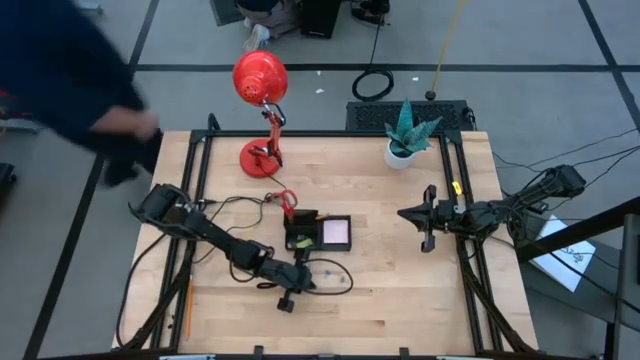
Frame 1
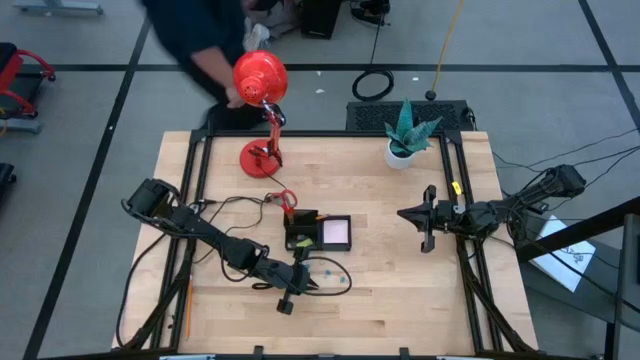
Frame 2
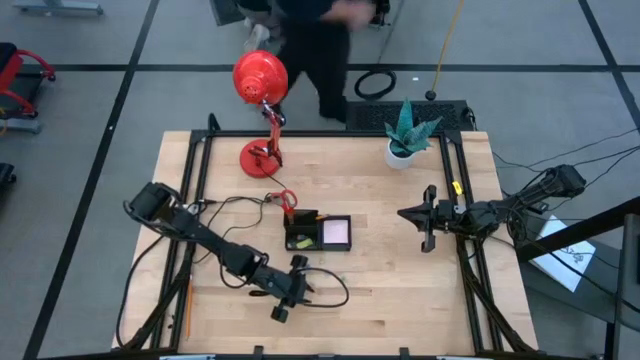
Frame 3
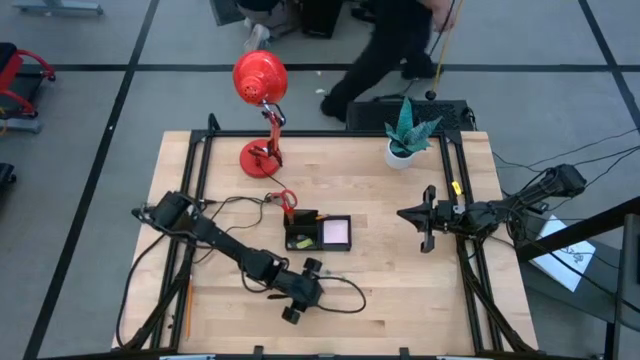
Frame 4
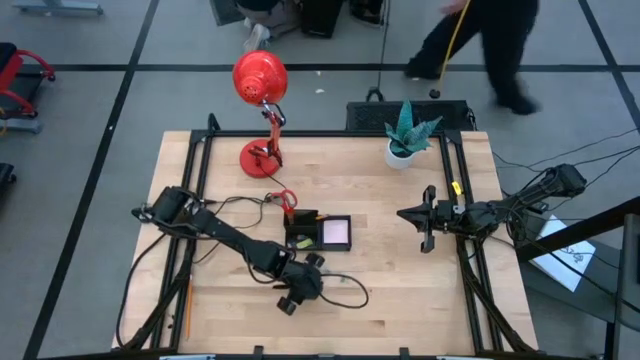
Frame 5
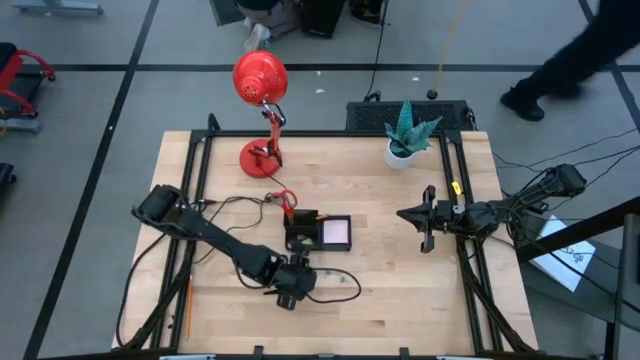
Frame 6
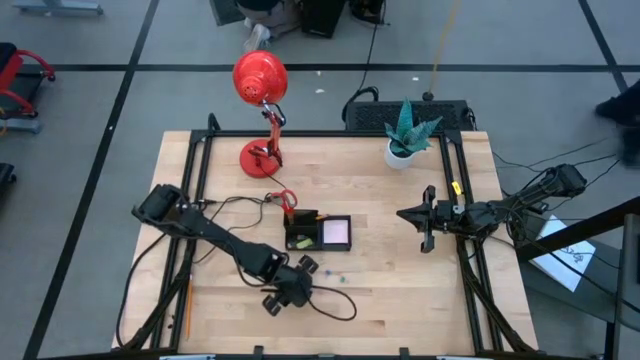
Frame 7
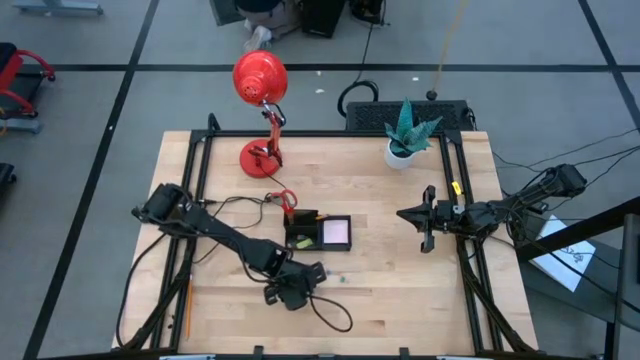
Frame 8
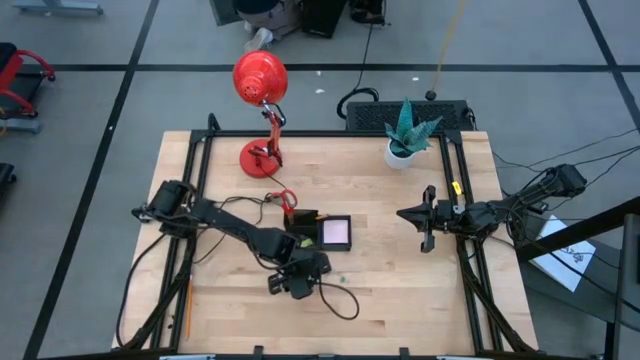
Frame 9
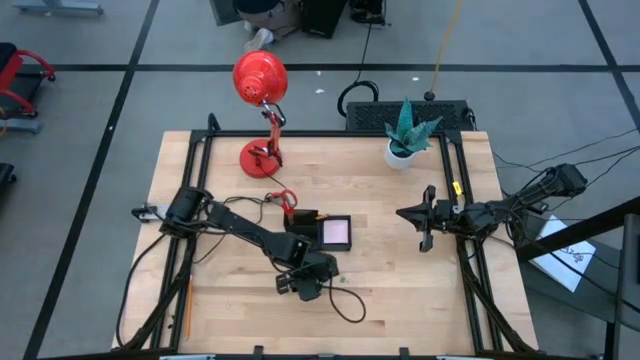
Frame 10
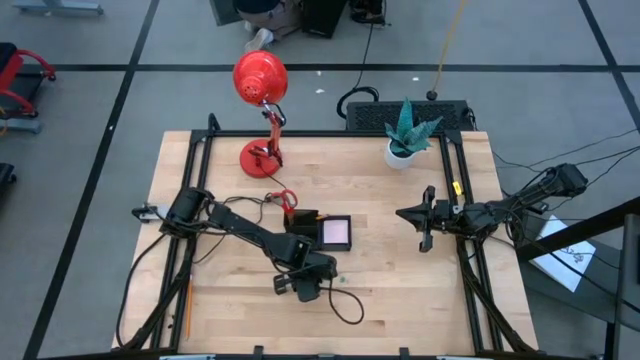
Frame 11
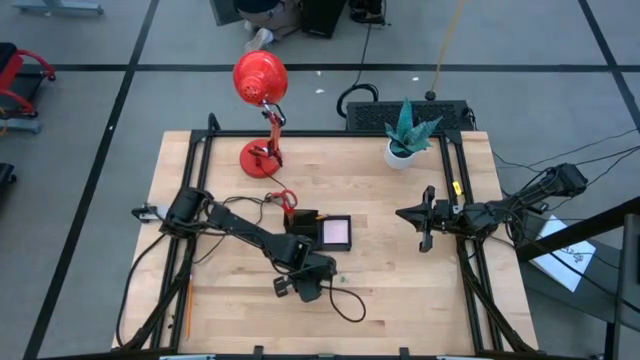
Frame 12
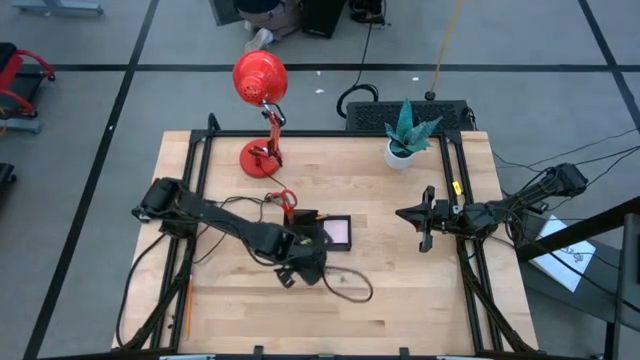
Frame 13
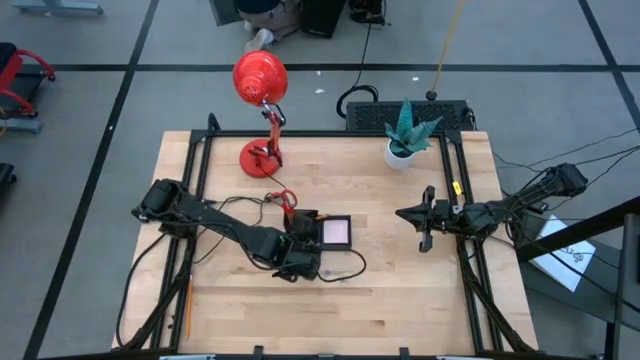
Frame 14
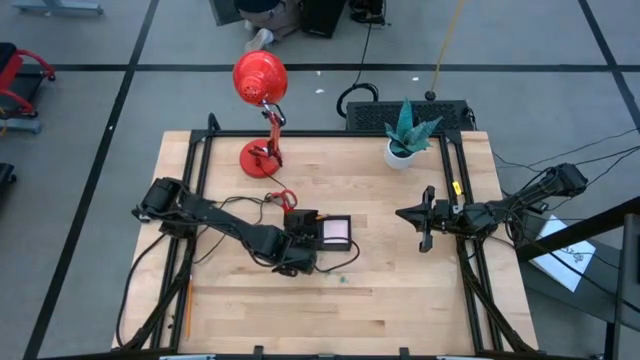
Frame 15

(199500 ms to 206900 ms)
Task: Pick and place office supplies into organizer
Put the pink binder clip into the black desk organizer

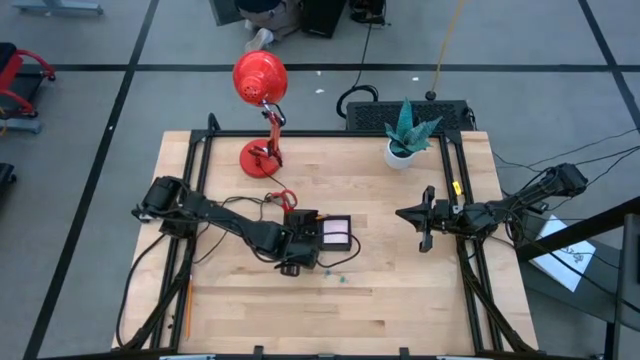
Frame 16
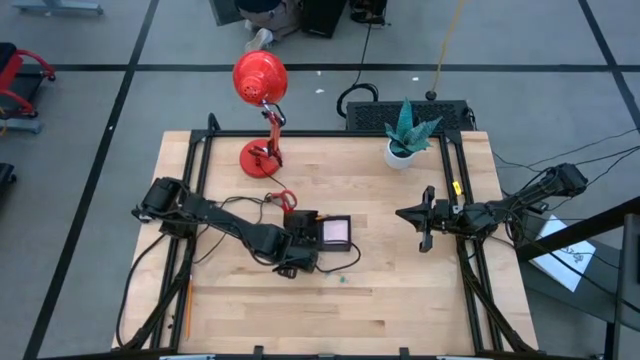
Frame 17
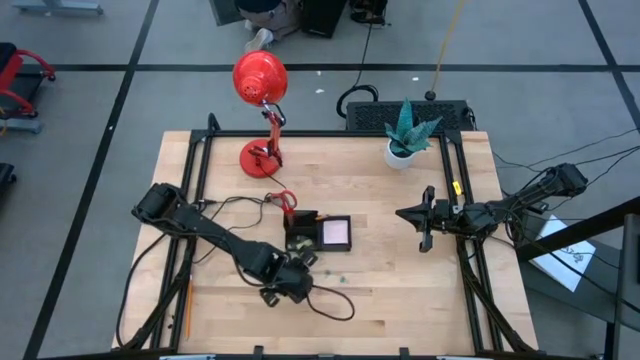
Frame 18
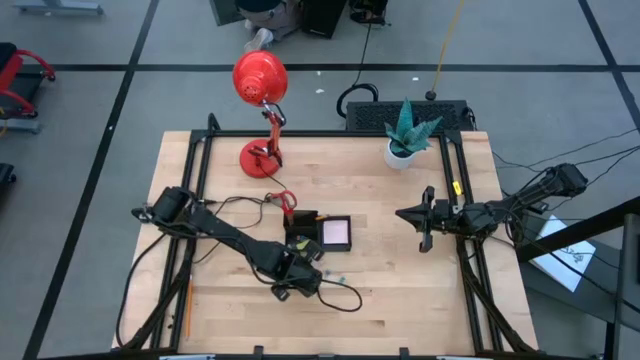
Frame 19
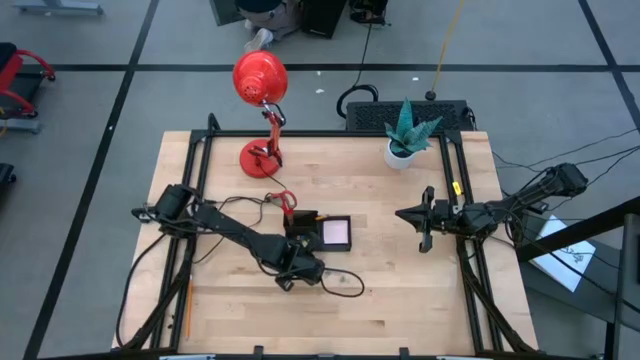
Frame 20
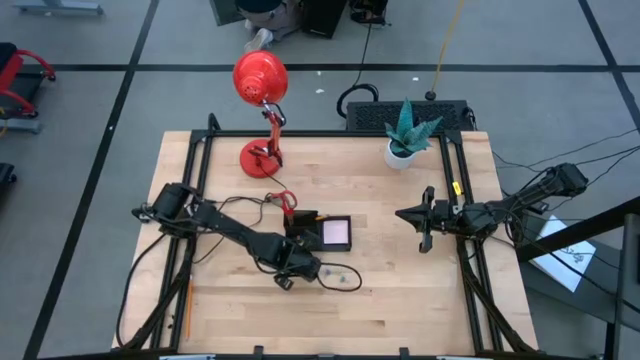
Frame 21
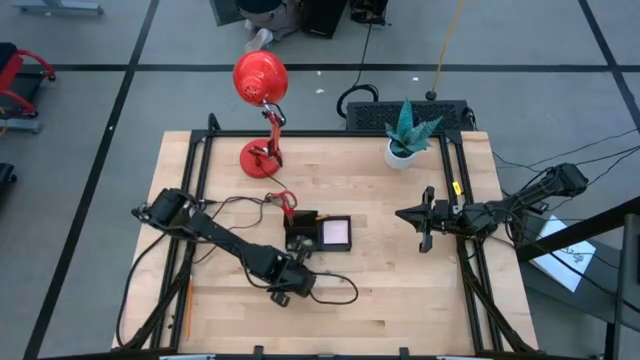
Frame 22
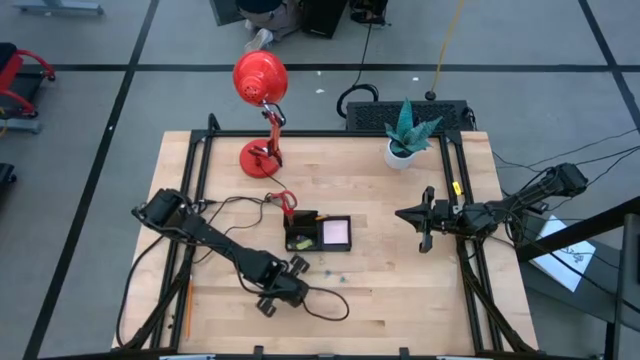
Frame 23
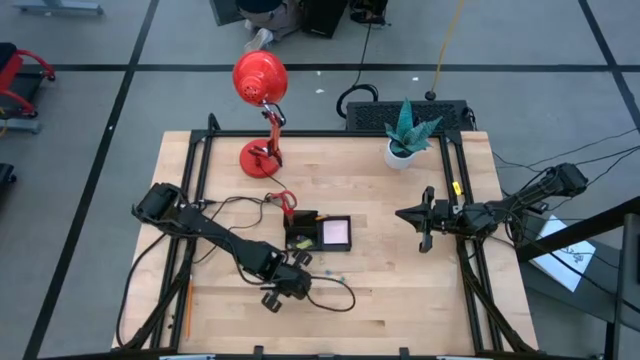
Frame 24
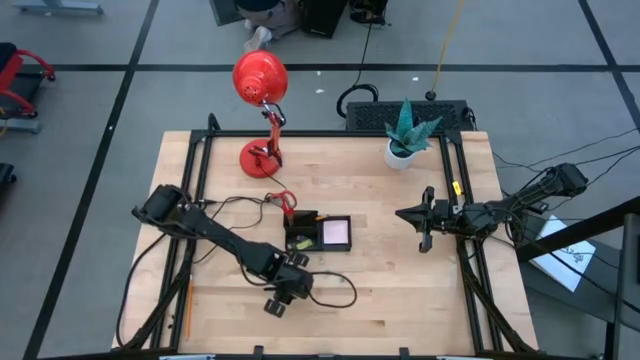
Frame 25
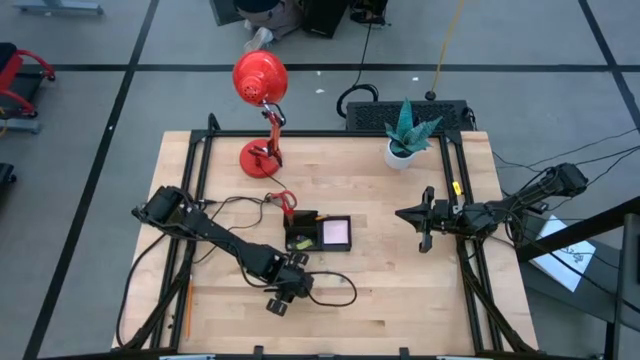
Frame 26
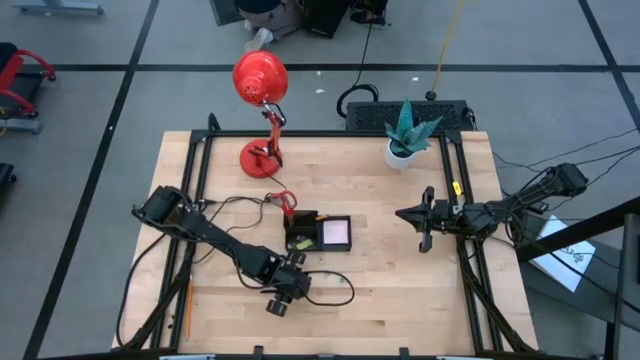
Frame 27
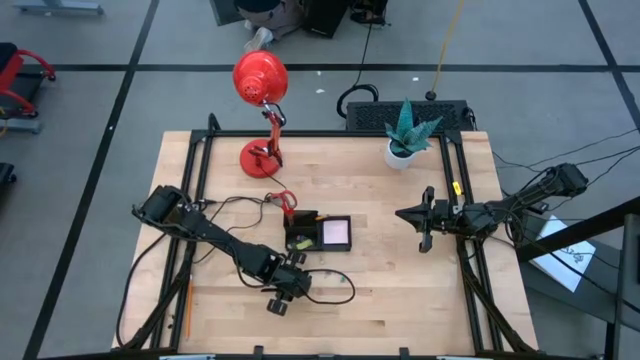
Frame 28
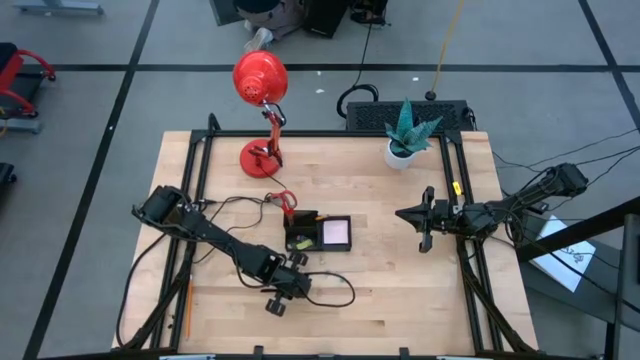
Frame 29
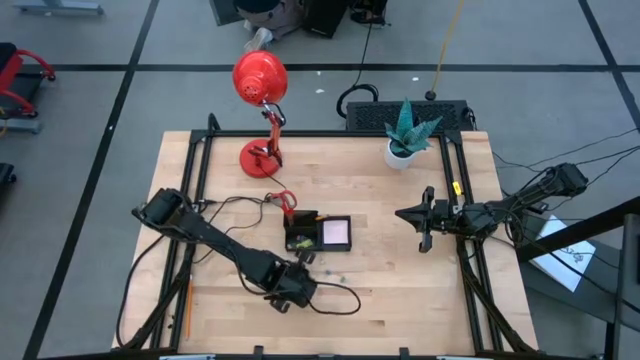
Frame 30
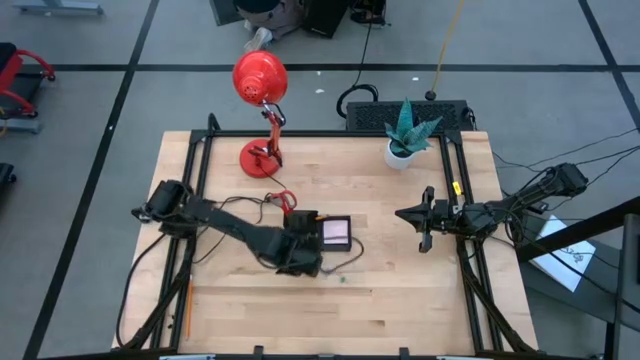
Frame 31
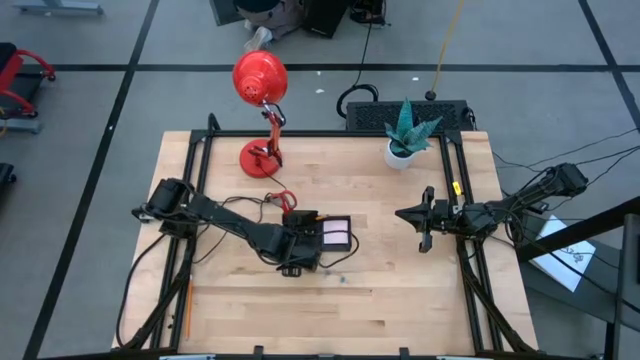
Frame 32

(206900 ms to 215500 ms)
Put the blue binder clip into the black desk organizer

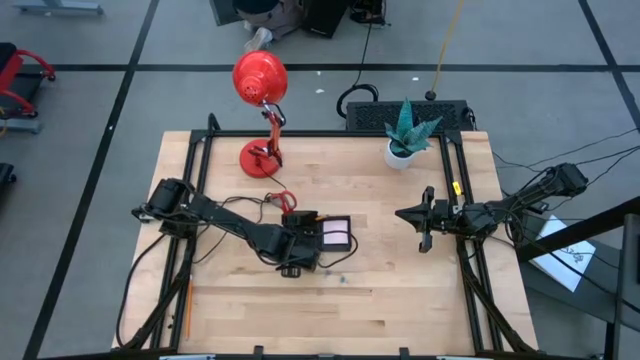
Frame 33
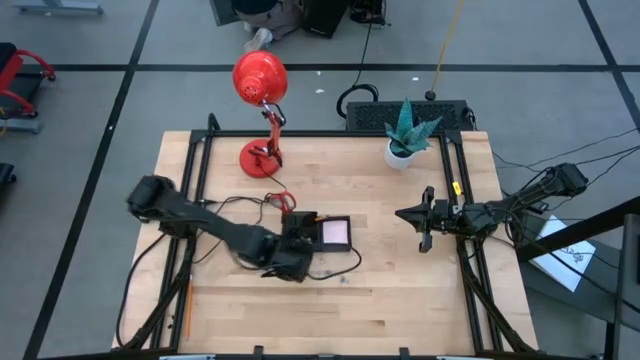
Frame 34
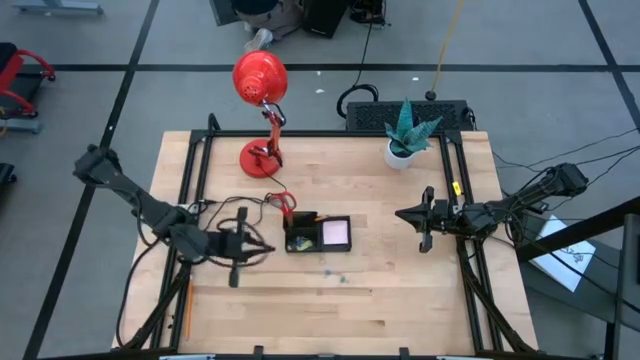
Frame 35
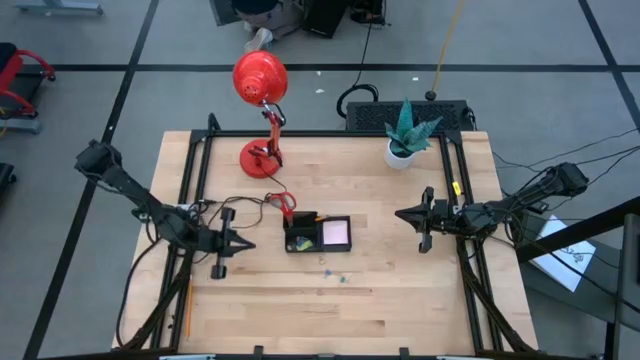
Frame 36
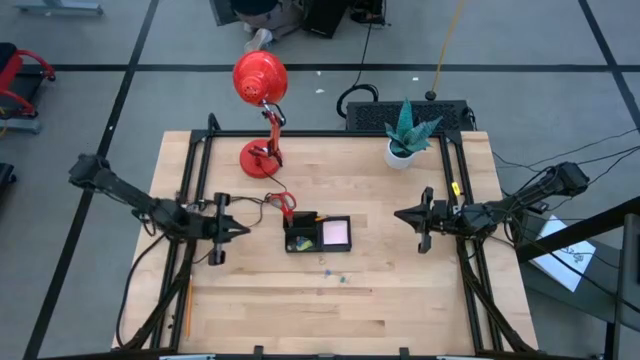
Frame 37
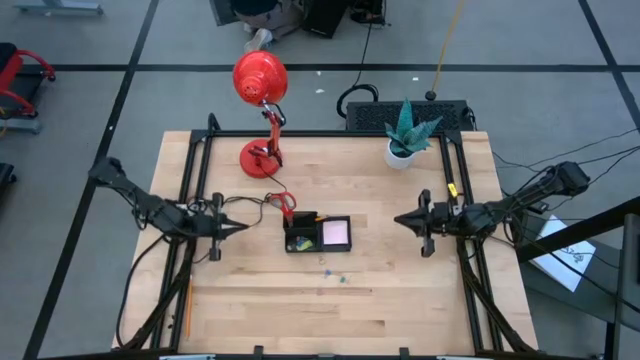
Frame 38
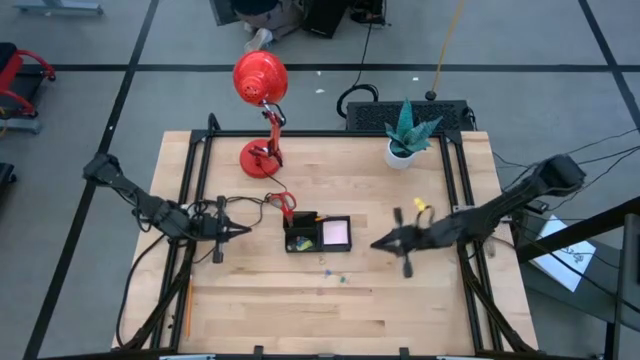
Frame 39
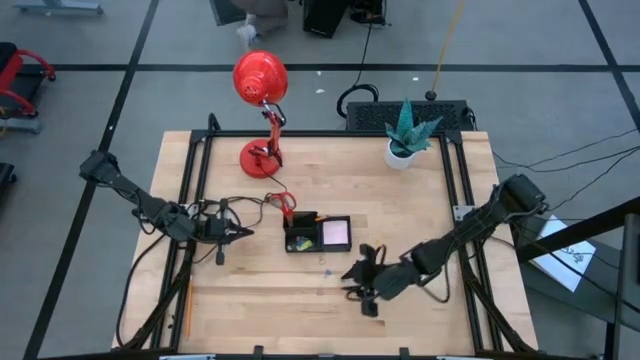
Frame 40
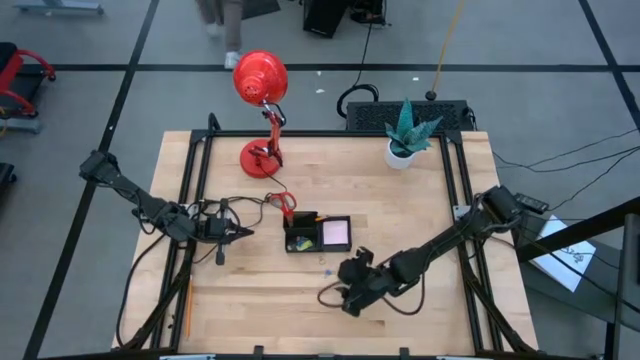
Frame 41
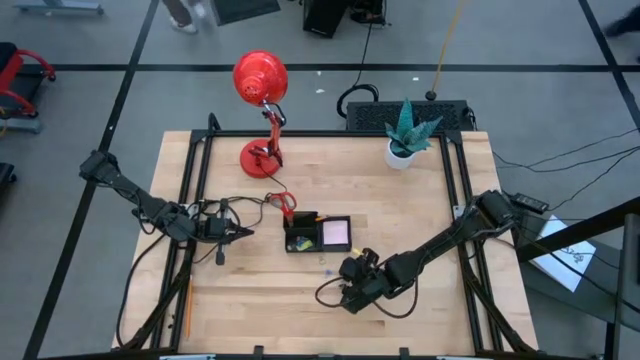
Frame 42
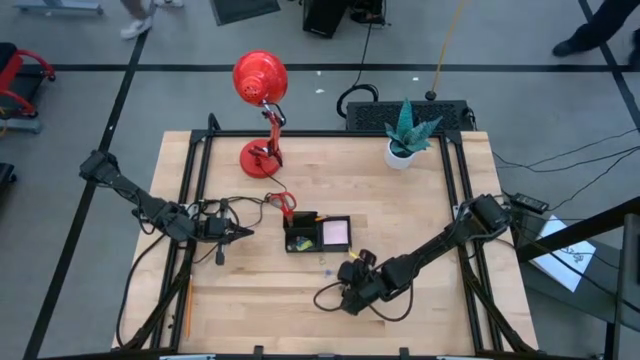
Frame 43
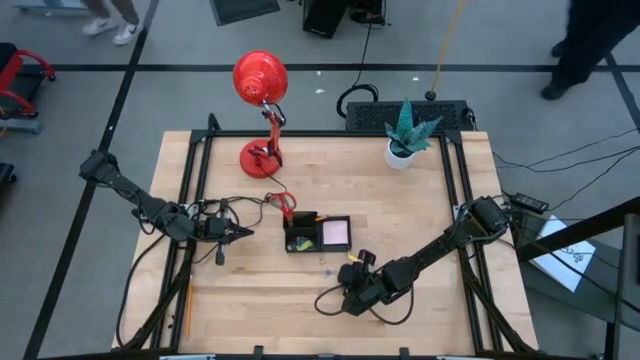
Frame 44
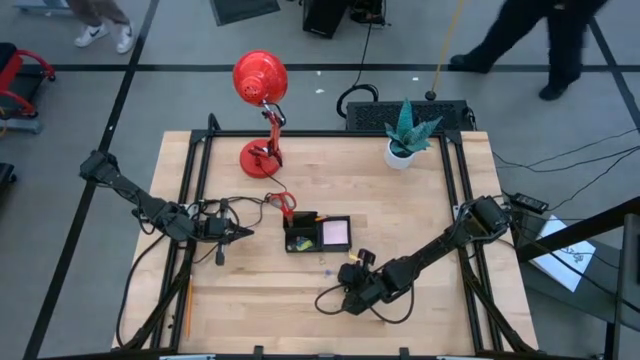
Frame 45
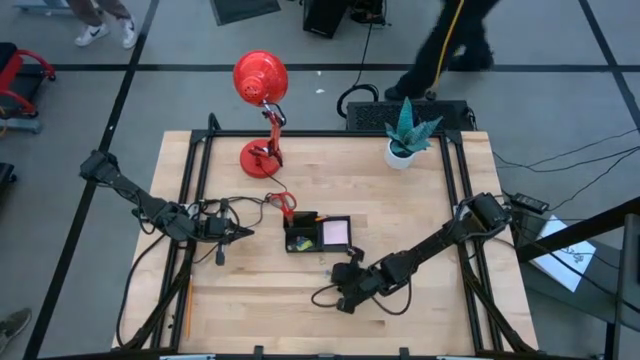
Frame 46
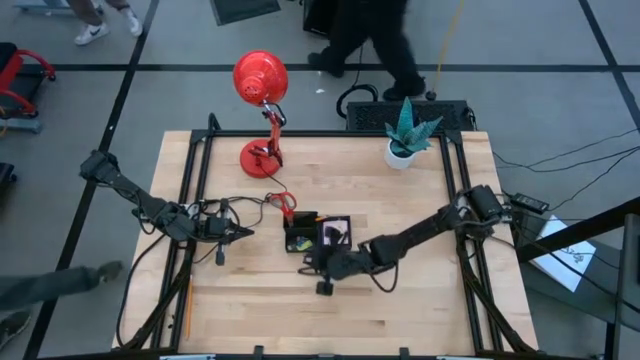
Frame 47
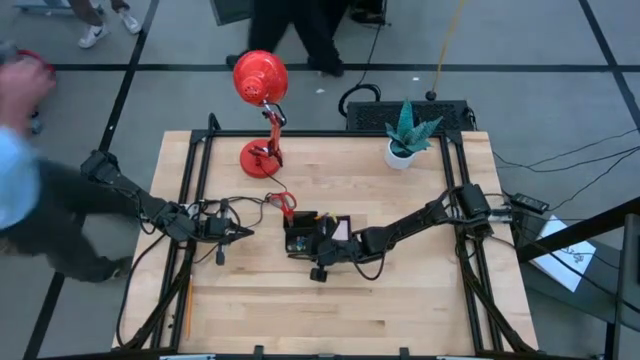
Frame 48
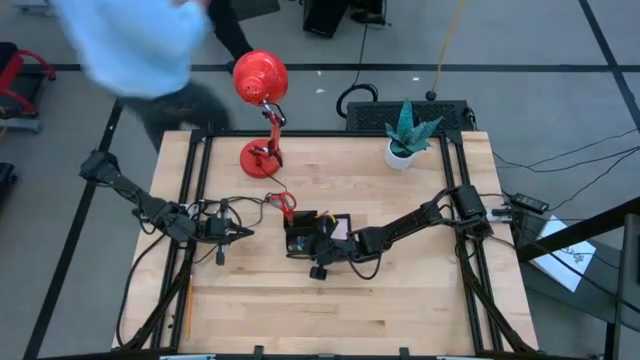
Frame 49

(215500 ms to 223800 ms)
Put the blue binder clip into the black desk organizer
